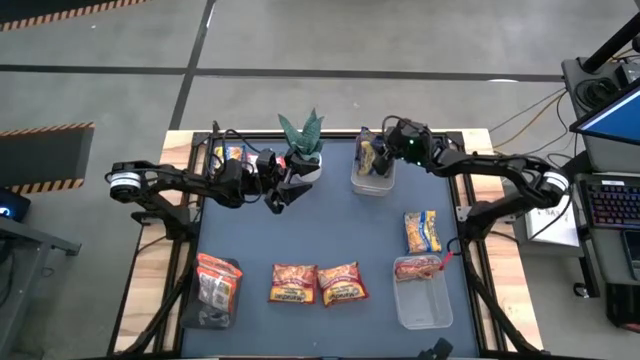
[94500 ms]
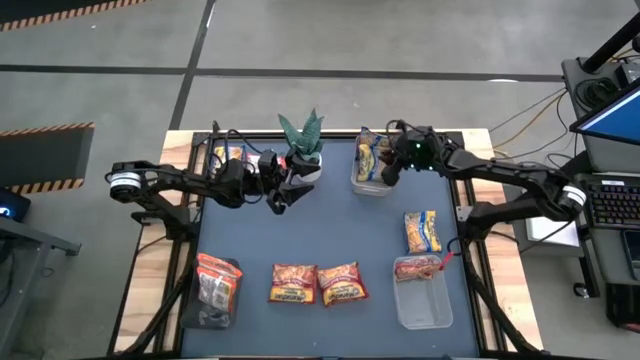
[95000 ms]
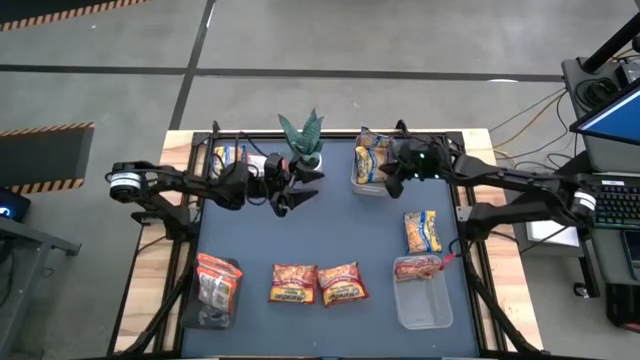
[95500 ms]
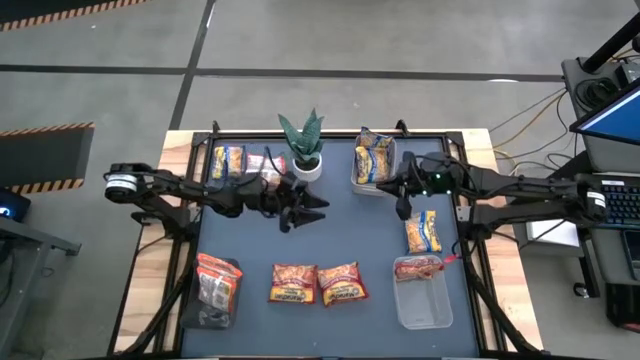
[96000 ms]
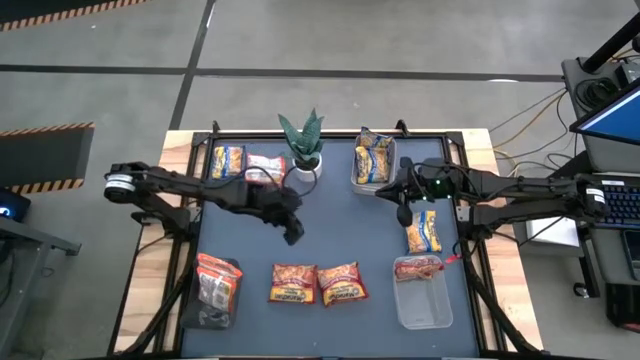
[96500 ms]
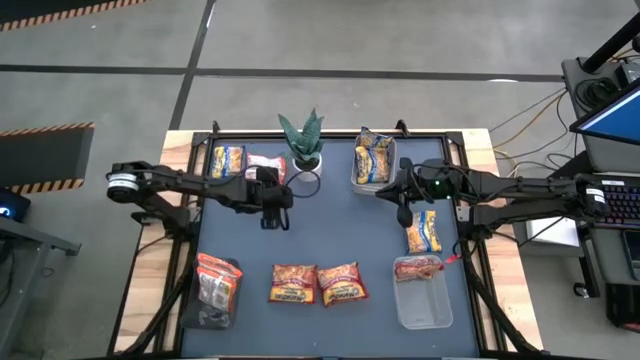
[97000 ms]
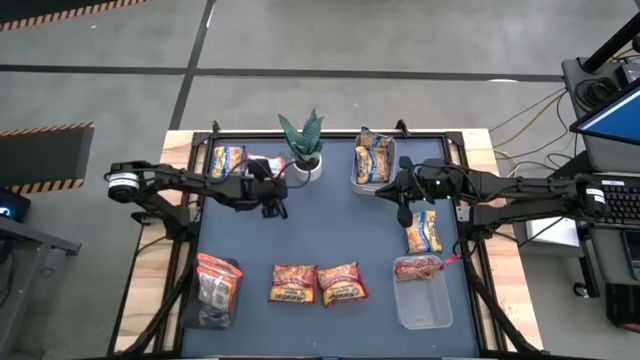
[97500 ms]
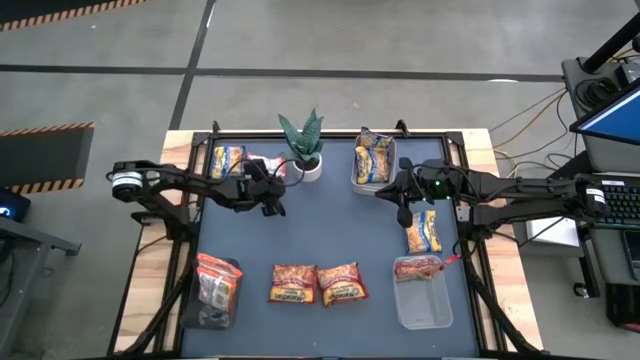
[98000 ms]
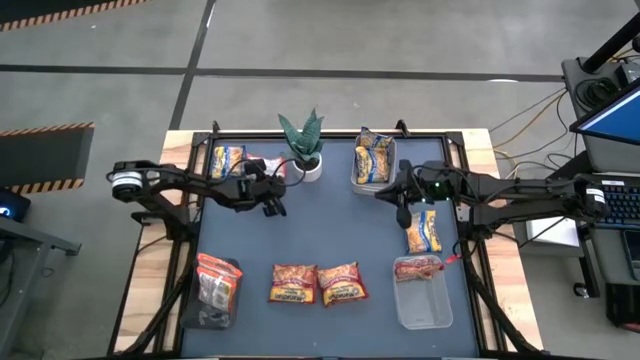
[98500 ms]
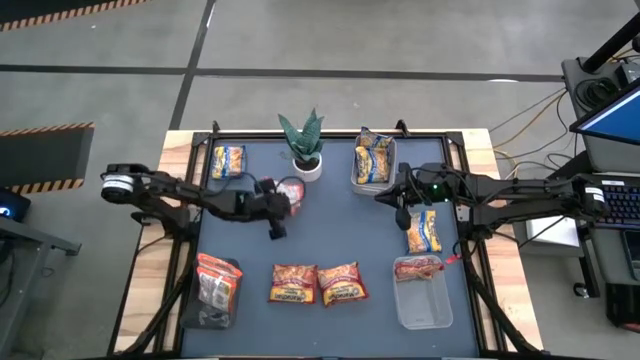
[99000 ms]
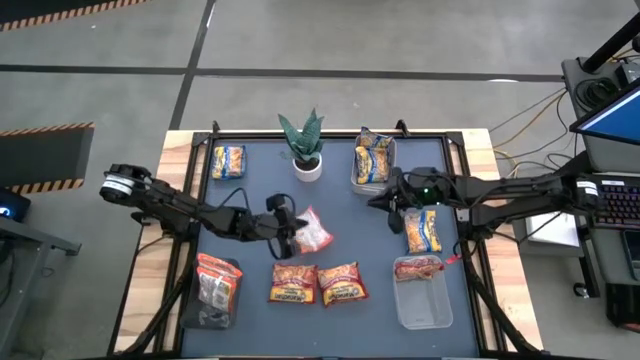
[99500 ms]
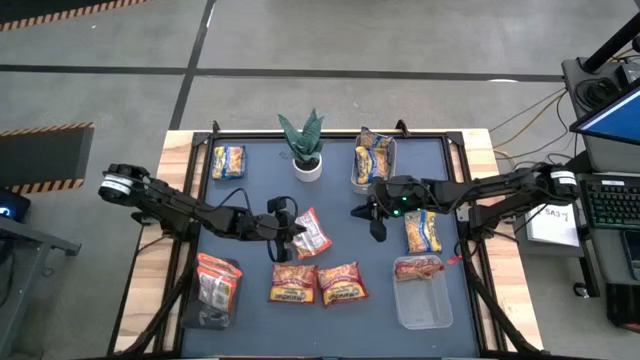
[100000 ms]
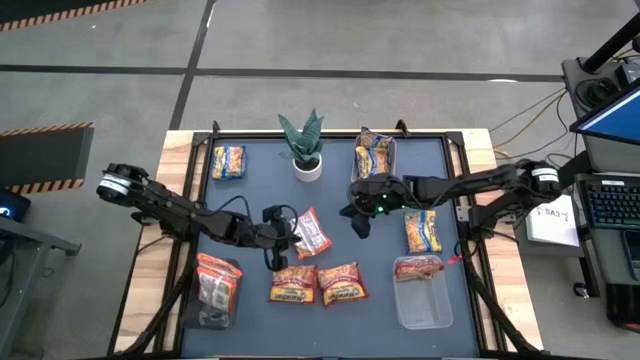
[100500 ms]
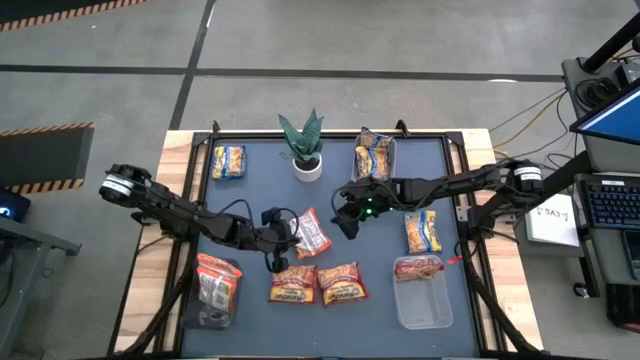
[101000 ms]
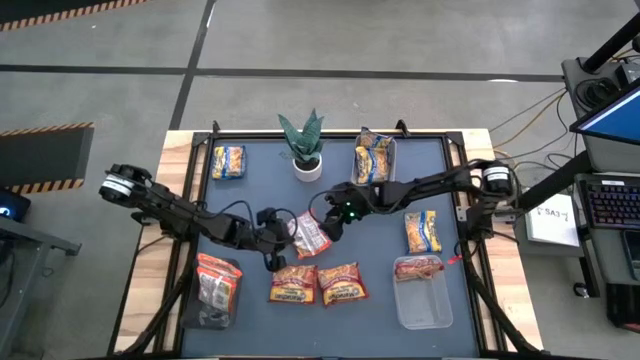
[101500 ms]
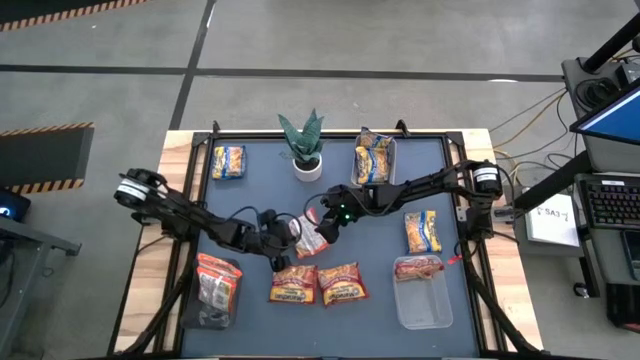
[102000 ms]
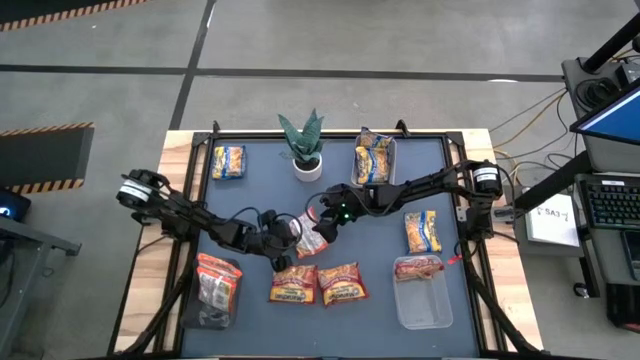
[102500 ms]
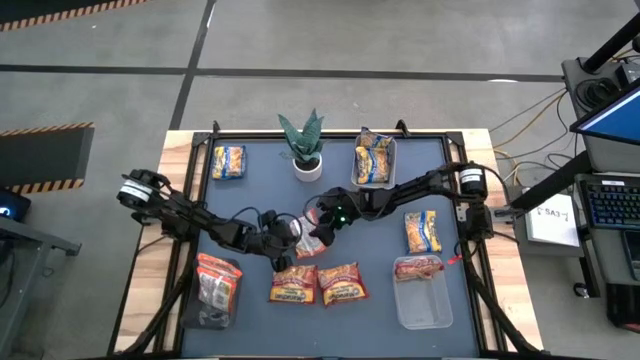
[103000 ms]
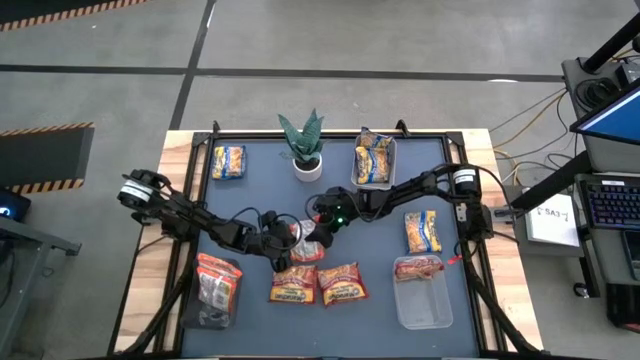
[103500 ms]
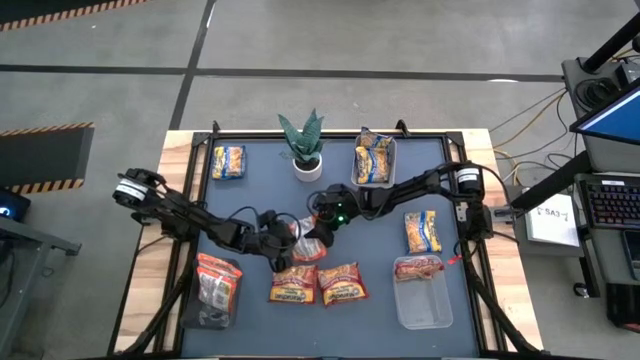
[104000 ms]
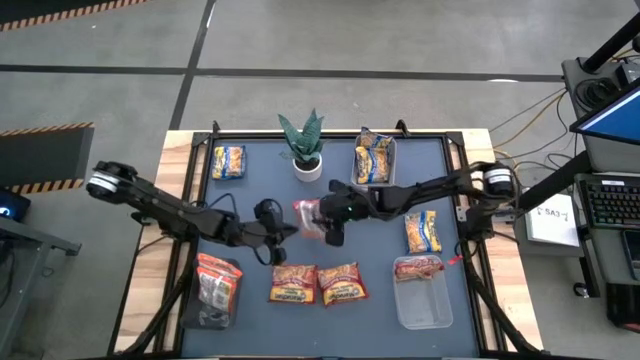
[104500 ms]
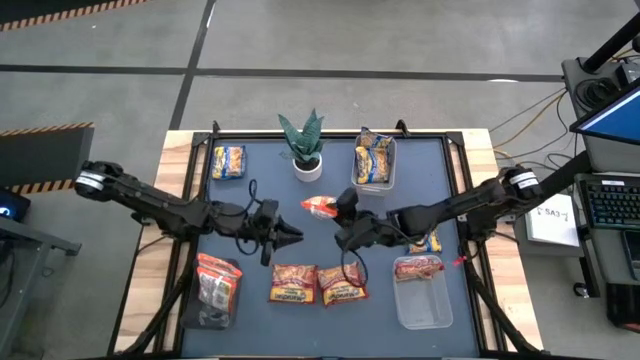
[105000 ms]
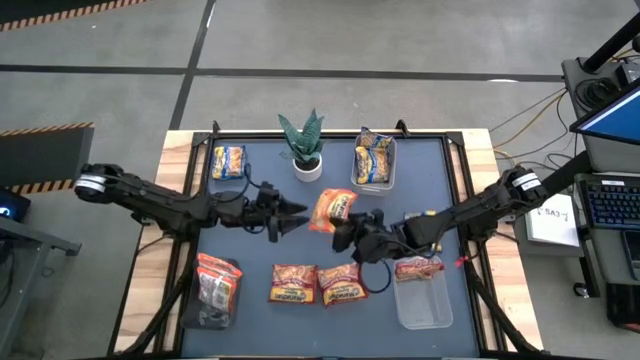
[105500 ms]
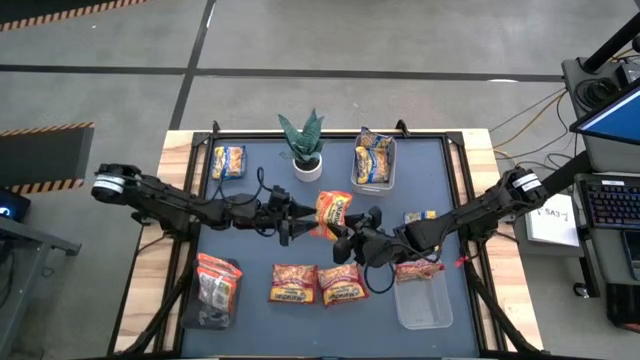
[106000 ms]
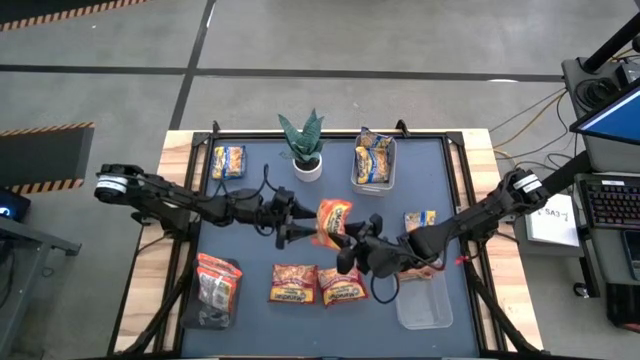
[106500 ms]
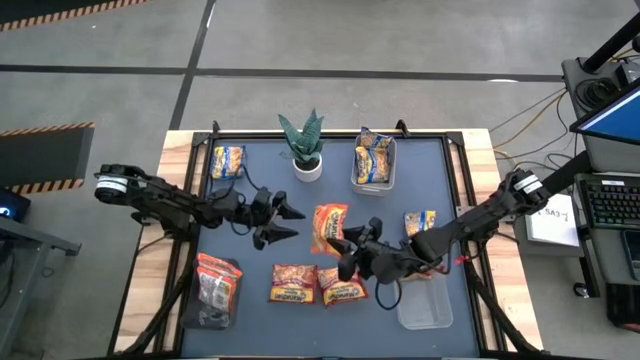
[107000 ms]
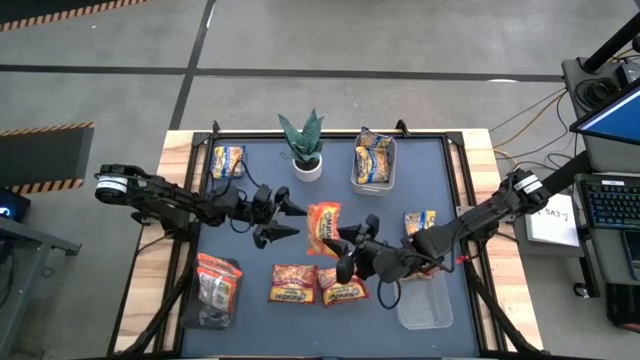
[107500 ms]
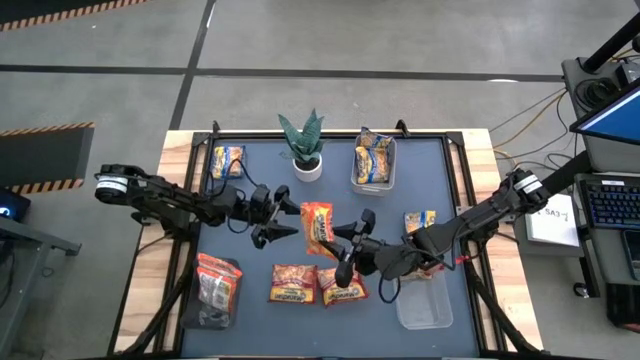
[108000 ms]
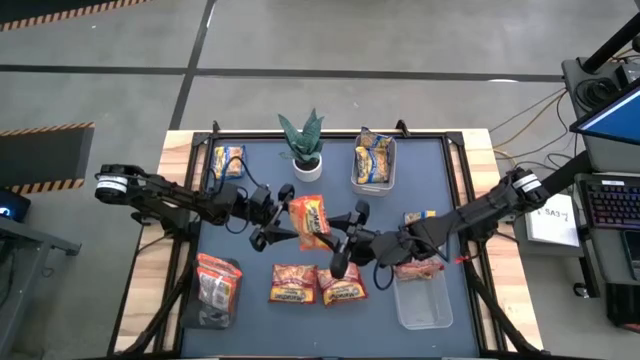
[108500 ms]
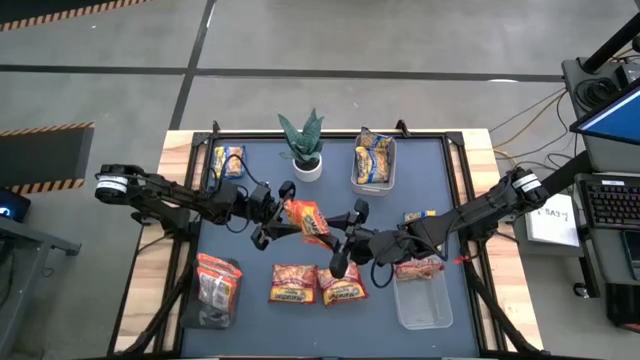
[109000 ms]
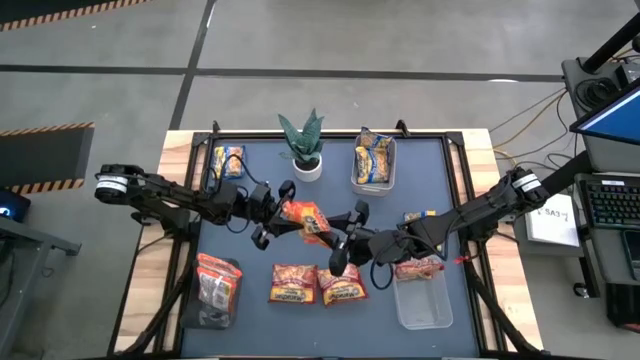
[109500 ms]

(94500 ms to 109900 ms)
Task: Sort Maruchan noodles
Put the orange instant noodle pack into the gray bin

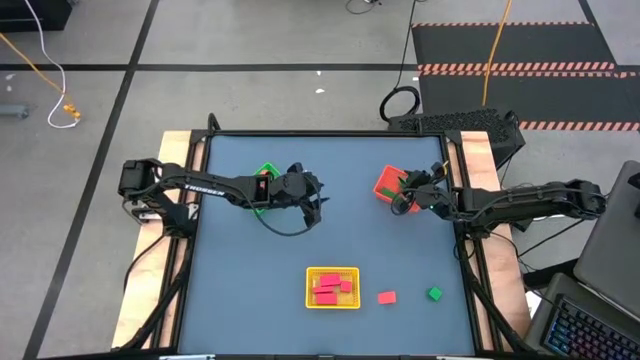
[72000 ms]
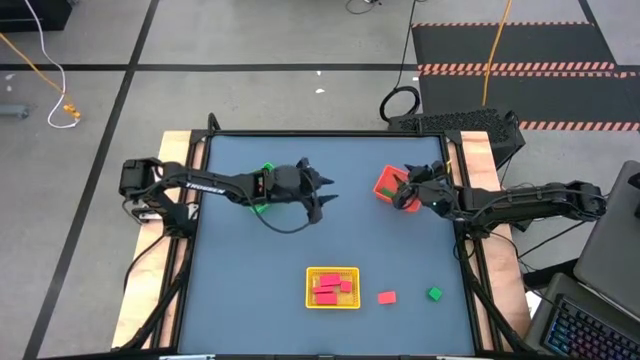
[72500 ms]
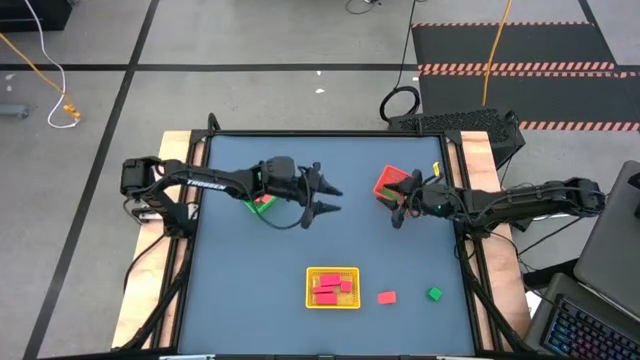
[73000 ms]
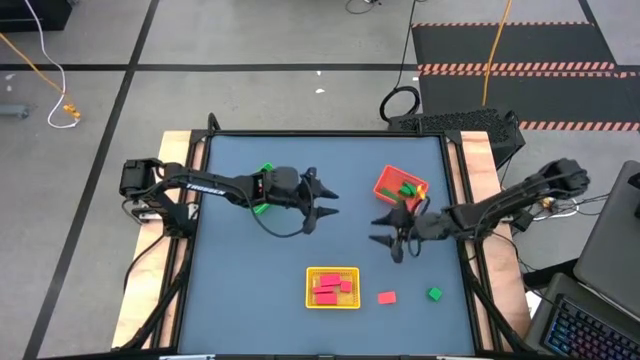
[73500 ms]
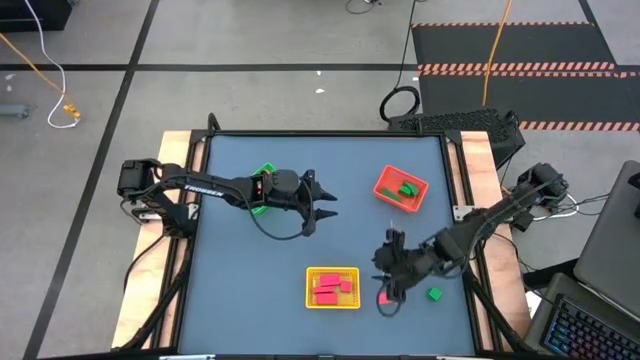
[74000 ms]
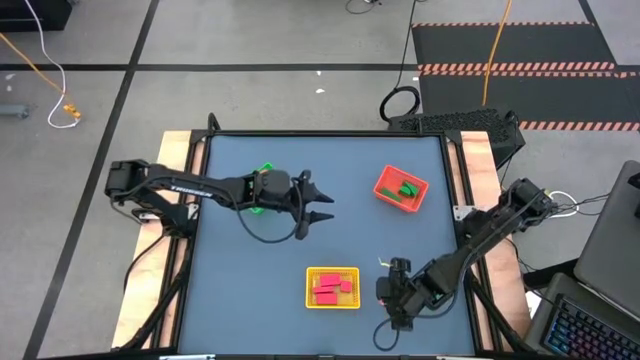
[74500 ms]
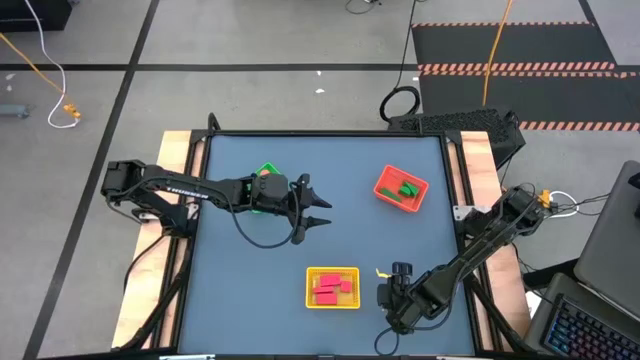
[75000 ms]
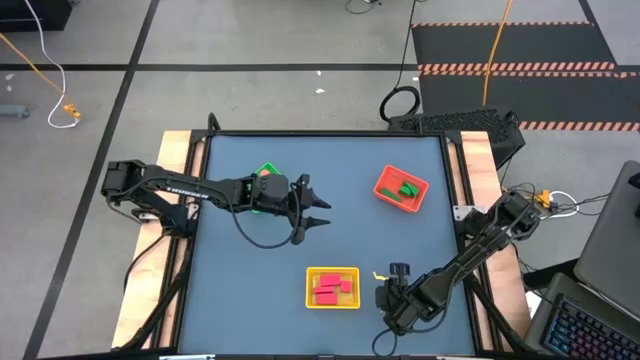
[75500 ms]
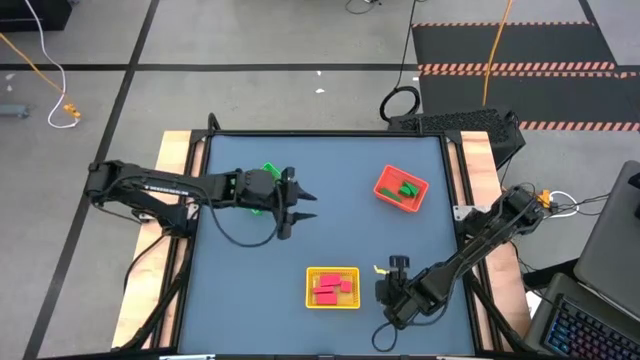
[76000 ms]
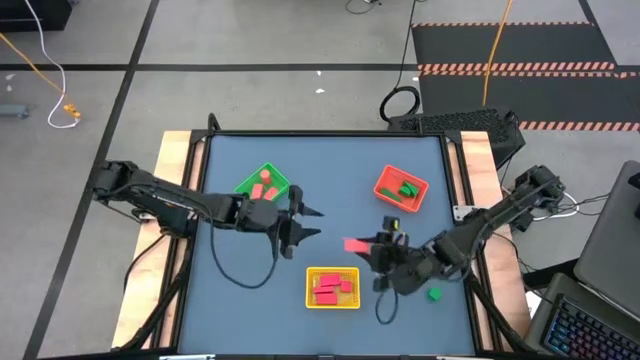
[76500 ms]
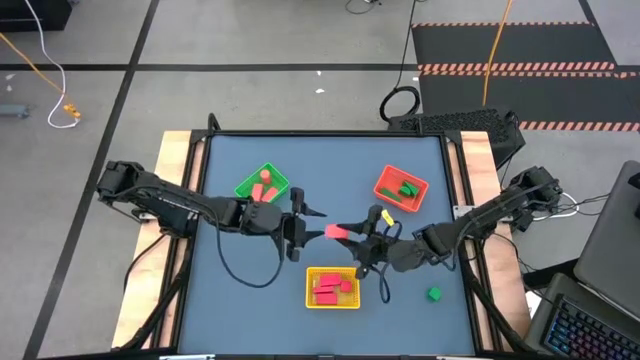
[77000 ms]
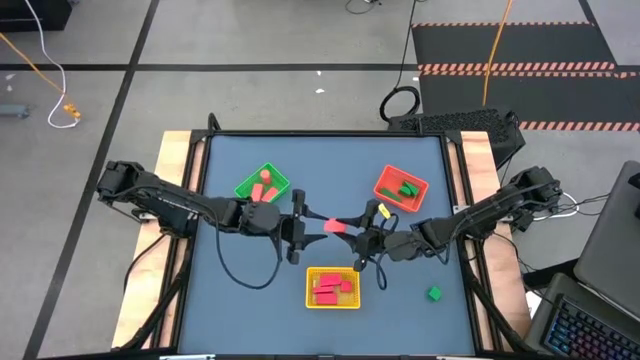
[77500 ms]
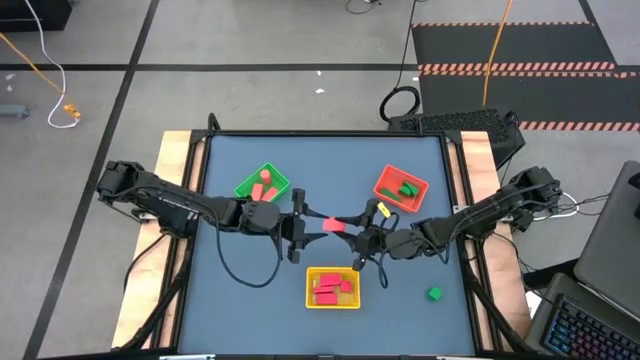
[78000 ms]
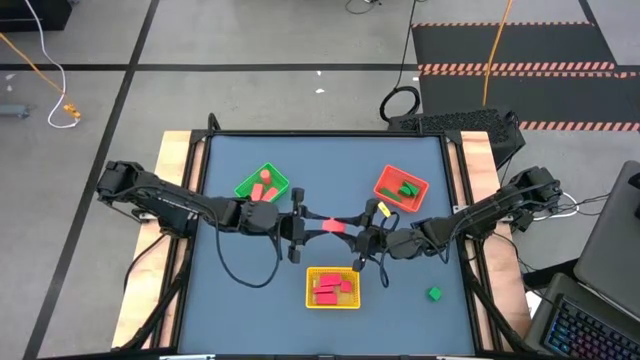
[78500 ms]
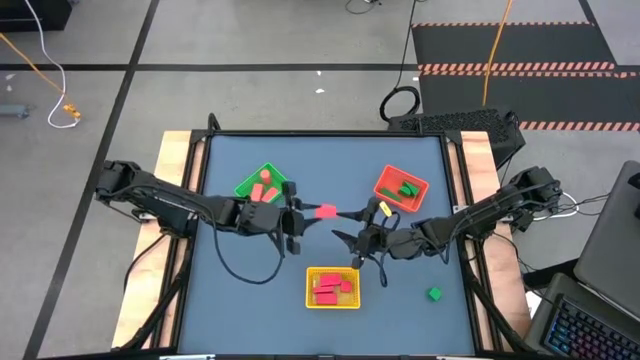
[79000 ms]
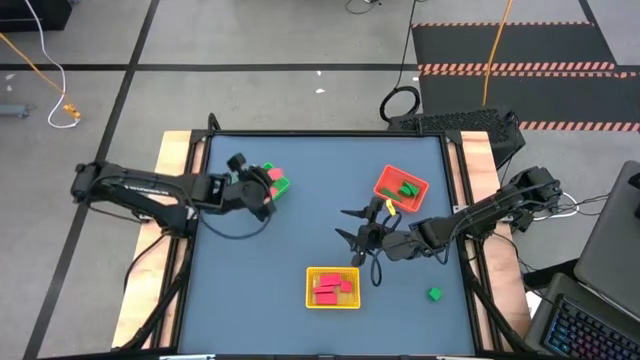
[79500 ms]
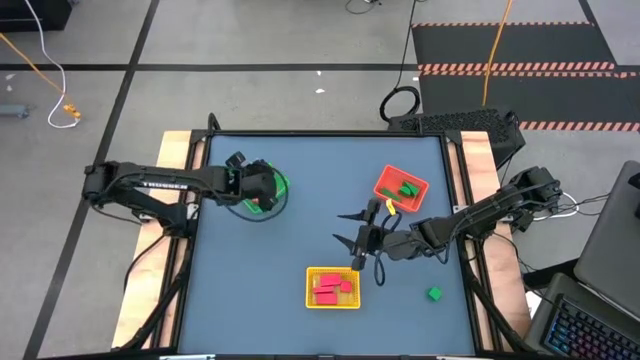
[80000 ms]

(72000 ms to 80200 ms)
Task: Sort & place blocks by color
Put the orange block into the green bin
